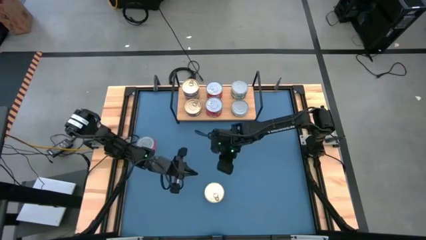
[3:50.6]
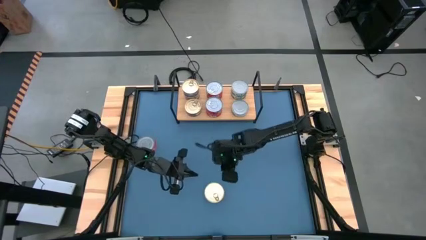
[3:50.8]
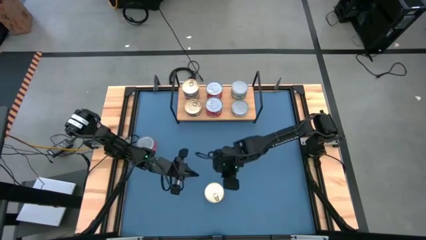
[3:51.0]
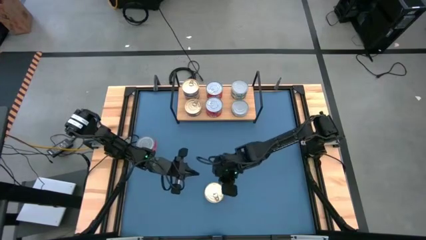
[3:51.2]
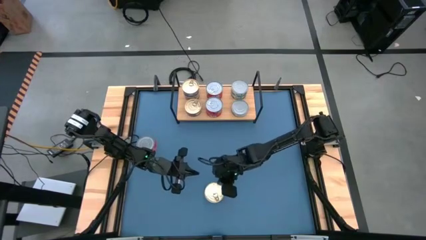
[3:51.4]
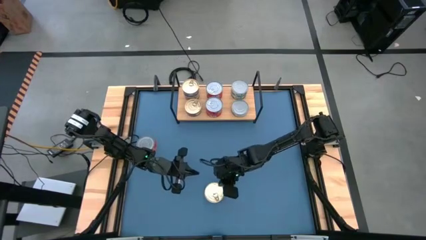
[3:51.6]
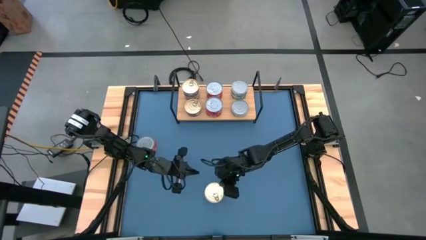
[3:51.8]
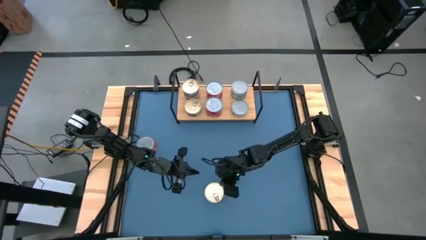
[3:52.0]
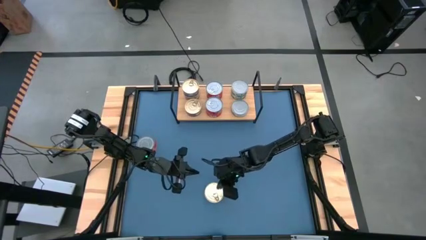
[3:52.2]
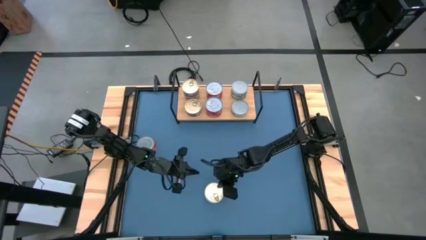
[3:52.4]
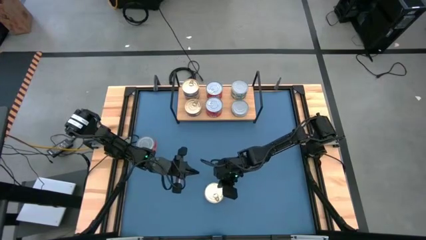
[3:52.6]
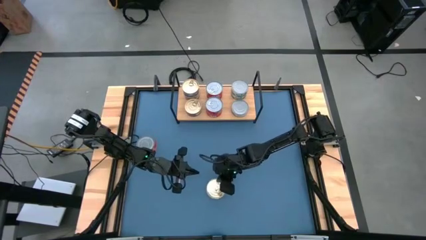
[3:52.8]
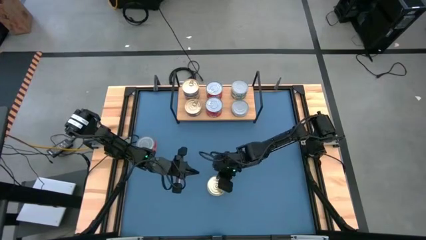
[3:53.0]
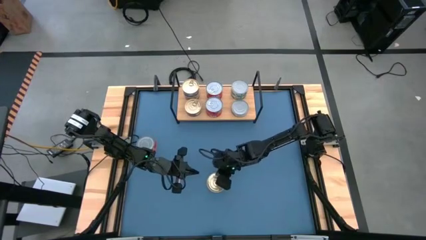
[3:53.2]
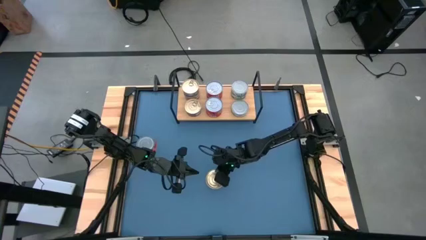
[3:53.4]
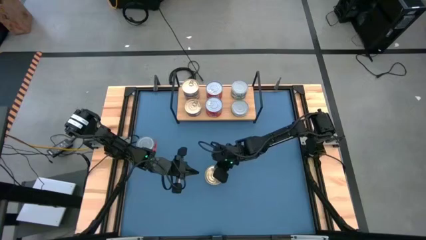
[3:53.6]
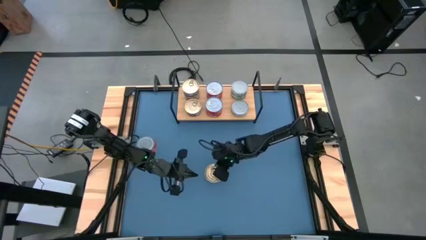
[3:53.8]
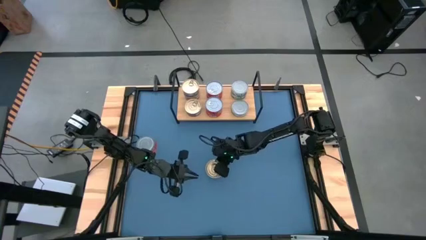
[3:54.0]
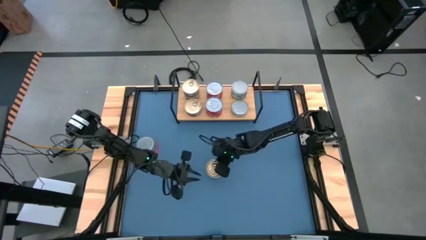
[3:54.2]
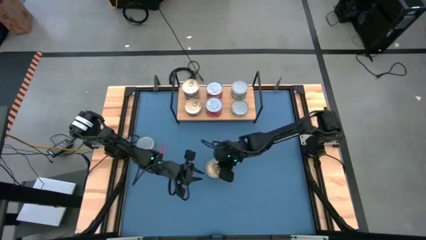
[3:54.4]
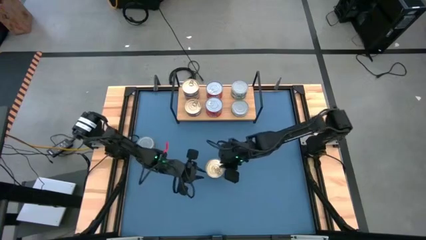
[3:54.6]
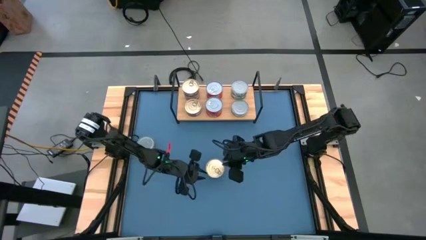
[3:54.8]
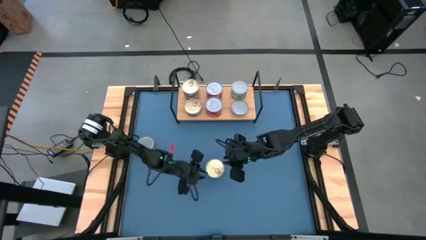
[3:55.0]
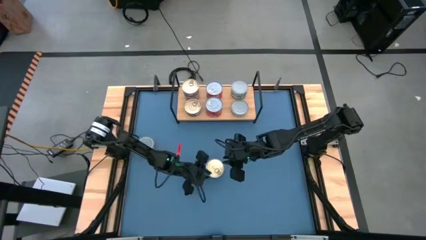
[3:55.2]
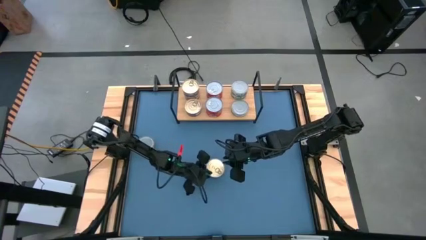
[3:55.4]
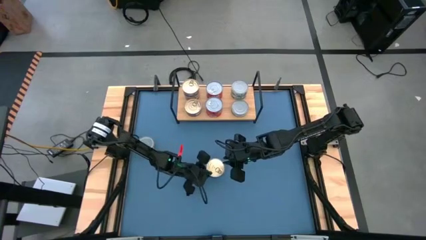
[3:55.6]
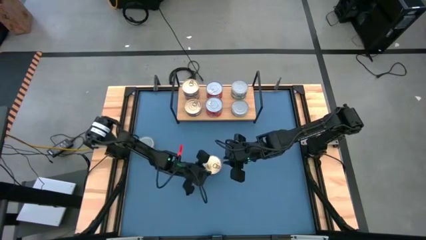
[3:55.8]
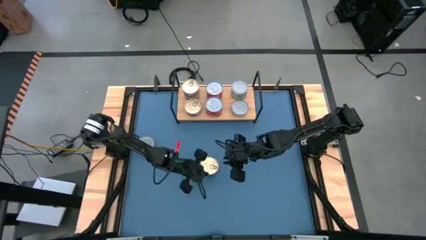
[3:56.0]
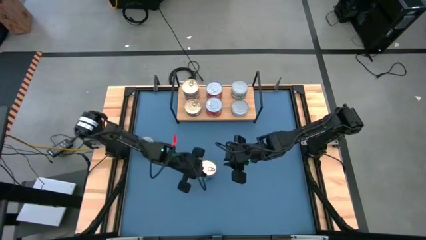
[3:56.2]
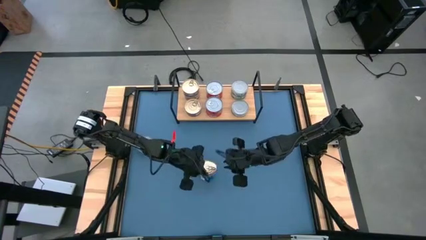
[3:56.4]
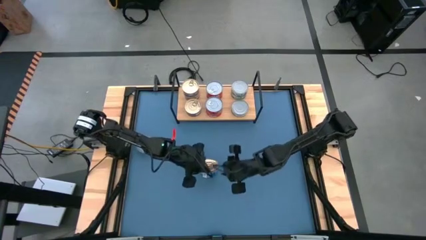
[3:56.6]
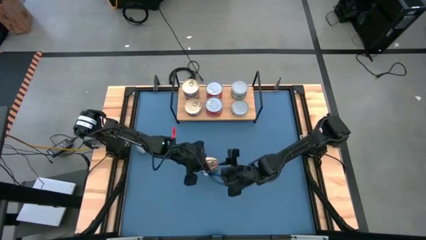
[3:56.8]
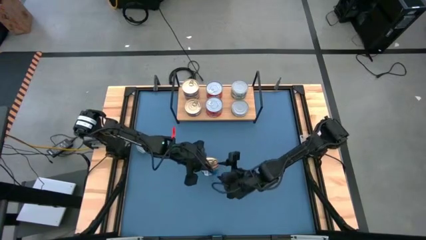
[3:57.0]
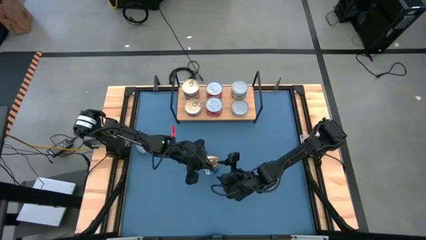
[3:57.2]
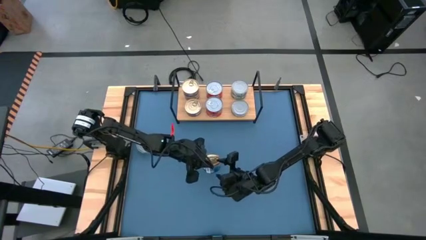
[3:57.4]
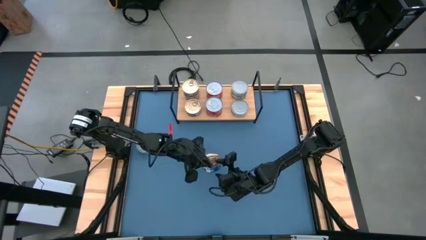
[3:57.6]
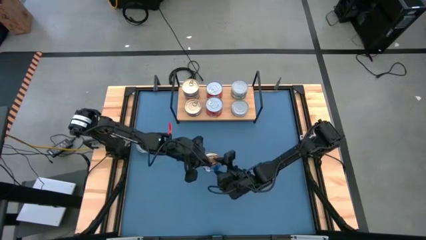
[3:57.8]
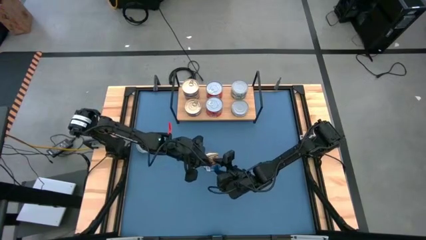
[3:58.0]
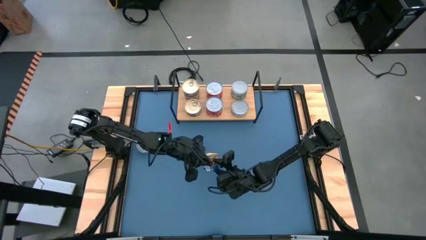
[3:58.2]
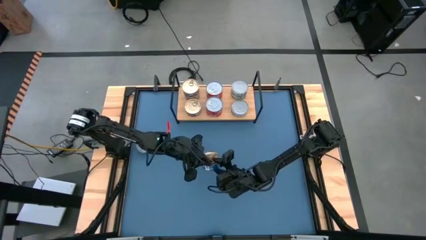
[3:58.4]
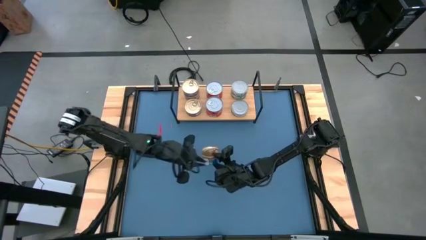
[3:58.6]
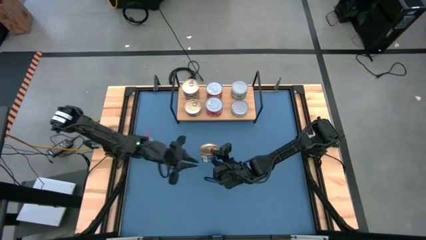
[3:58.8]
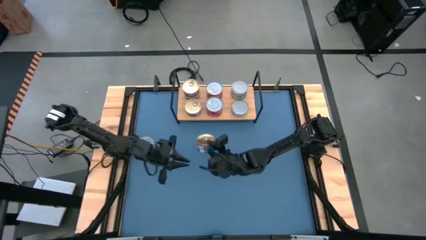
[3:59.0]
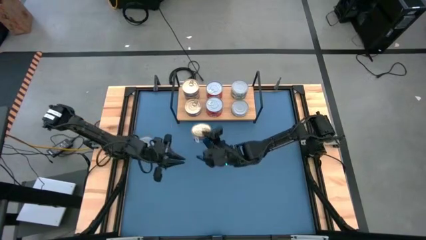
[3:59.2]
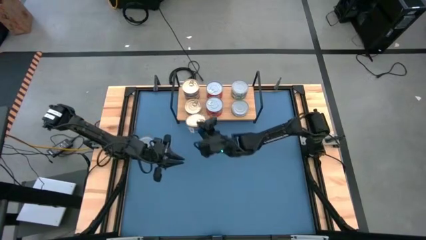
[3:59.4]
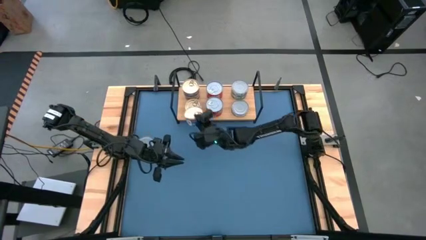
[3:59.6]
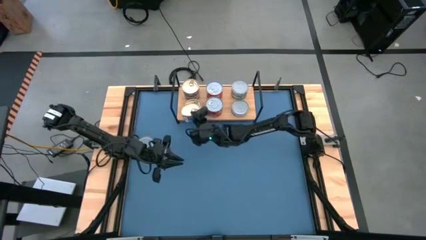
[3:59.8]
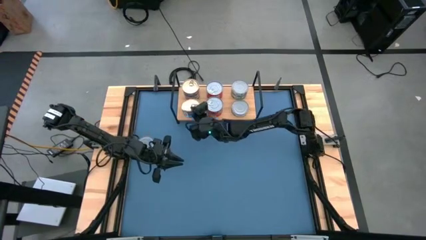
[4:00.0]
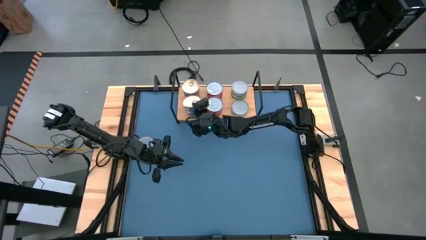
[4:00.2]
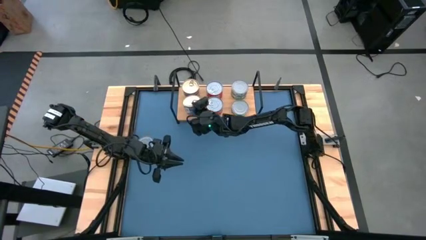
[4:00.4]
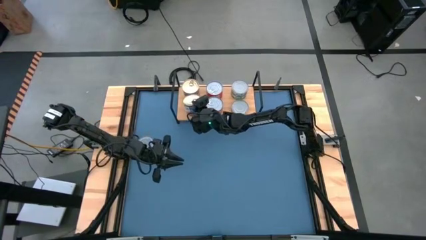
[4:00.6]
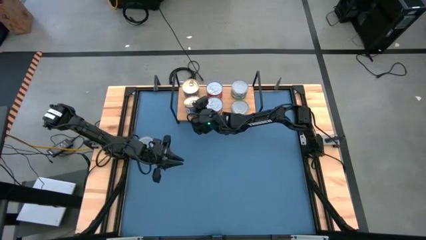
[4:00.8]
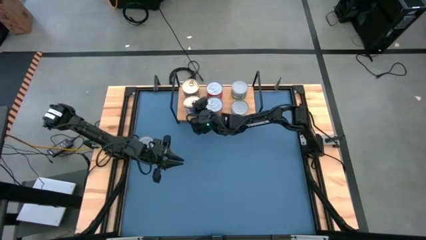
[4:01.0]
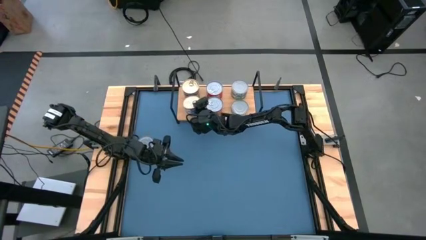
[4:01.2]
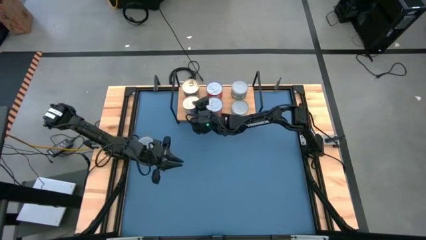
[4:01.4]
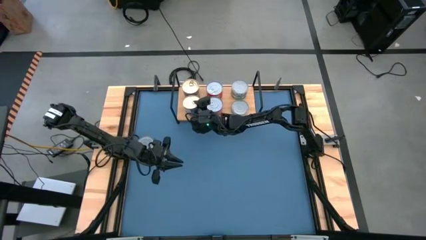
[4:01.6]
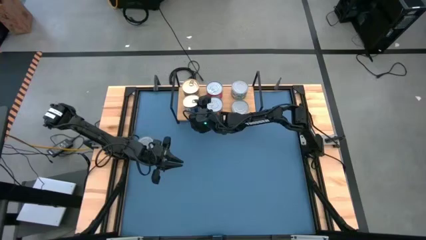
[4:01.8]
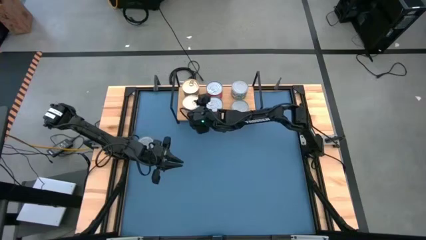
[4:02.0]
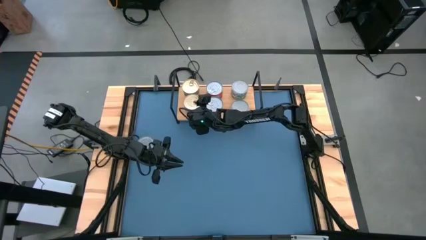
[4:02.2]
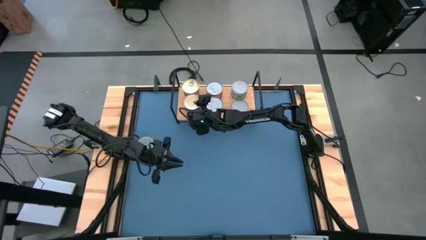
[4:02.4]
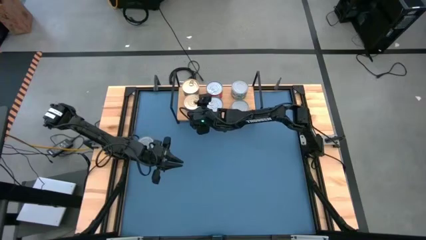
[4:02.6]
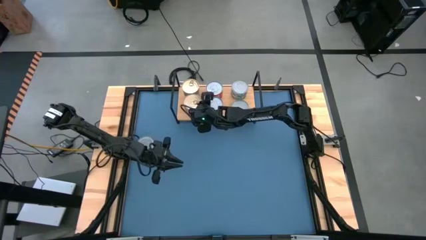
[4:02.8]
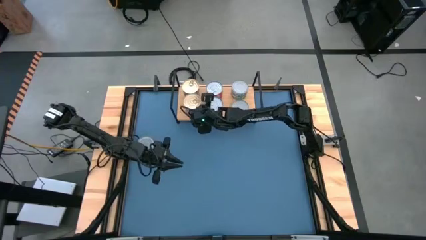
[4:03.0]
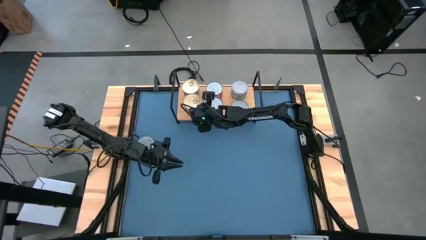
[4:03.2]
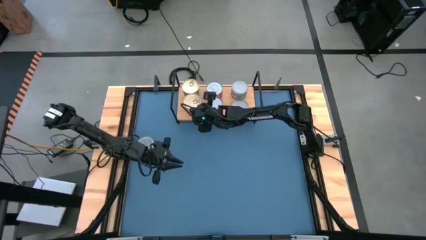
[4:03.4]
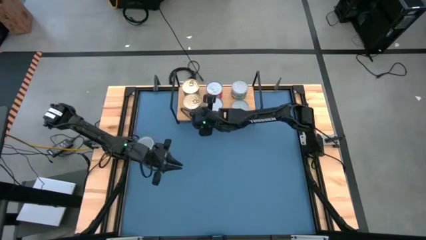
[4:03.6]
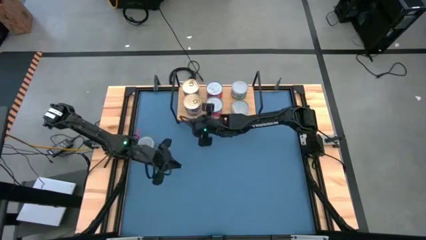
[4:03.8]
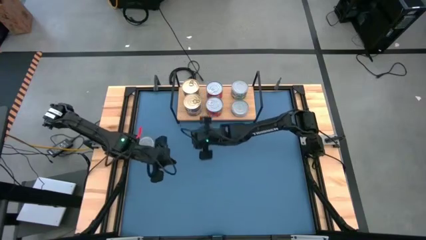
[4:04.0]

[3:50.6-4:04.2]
Task: Stack canned seafood by type on shelf
Stack the blue tuna can on top of the other blue tuna can on the shelf

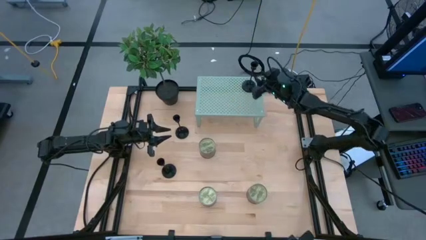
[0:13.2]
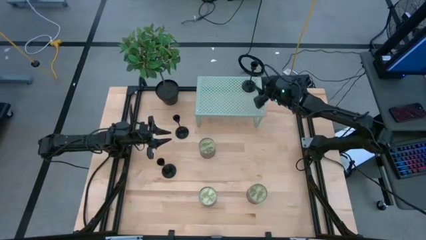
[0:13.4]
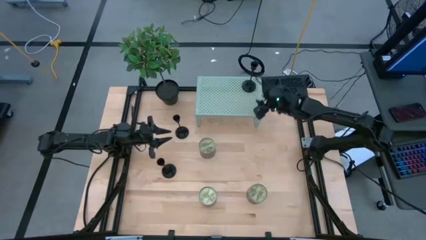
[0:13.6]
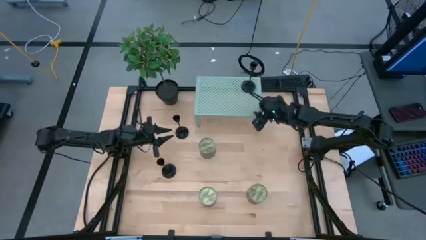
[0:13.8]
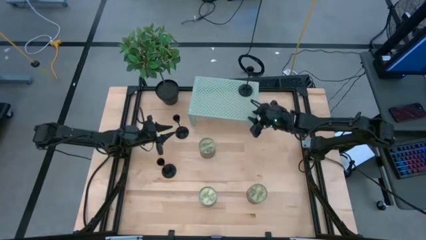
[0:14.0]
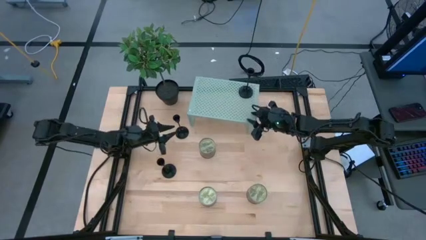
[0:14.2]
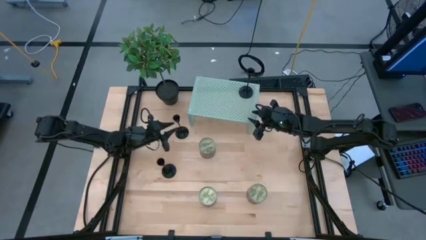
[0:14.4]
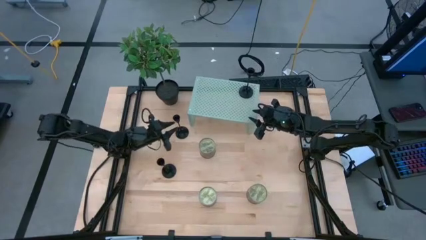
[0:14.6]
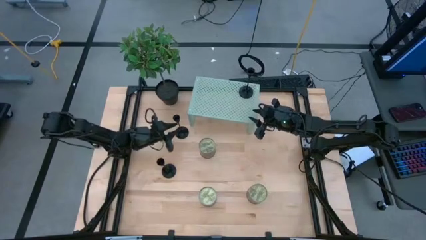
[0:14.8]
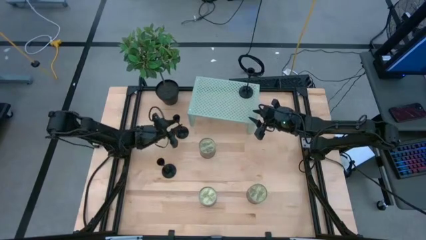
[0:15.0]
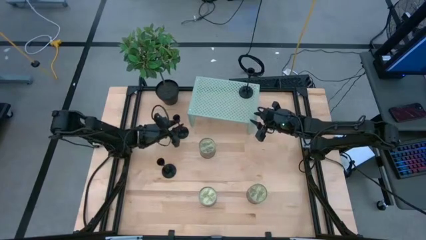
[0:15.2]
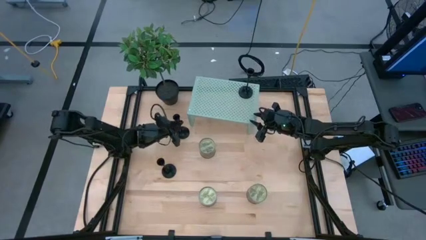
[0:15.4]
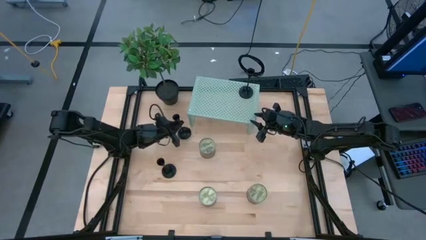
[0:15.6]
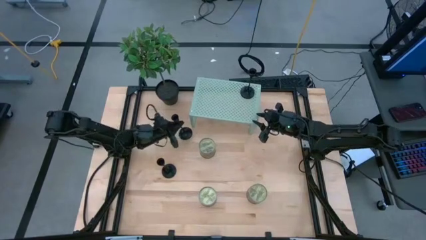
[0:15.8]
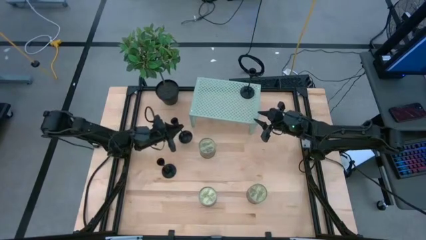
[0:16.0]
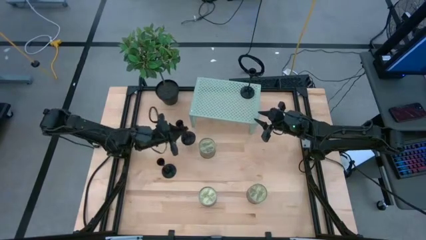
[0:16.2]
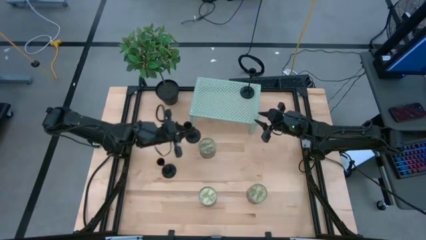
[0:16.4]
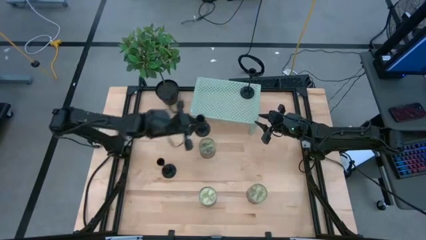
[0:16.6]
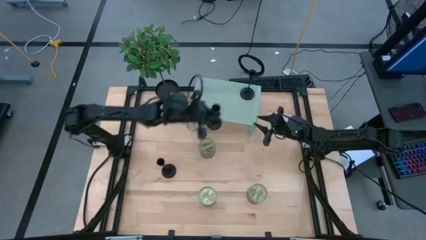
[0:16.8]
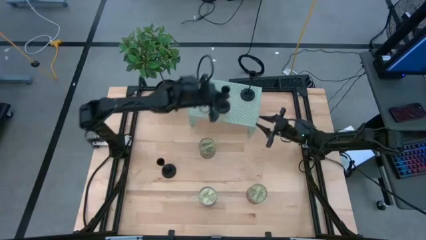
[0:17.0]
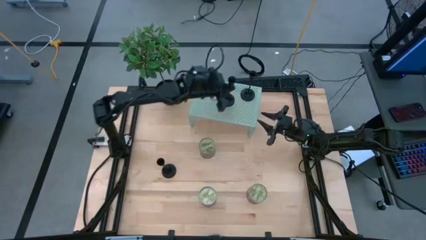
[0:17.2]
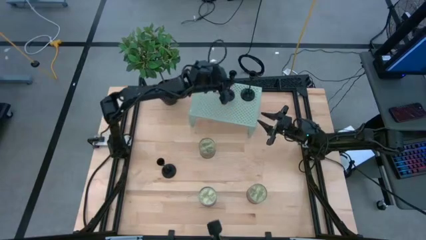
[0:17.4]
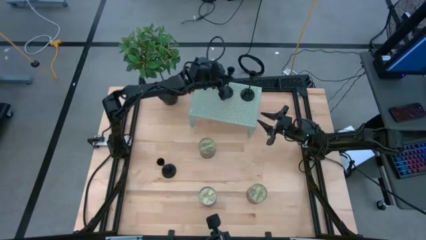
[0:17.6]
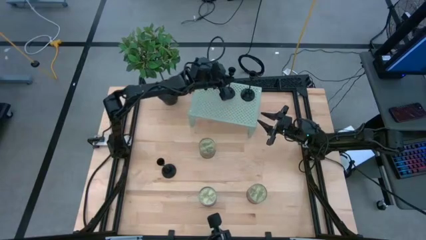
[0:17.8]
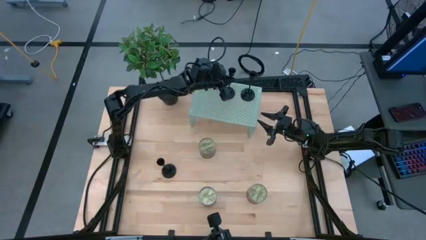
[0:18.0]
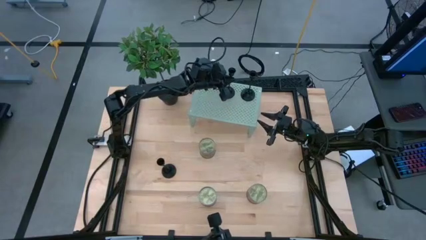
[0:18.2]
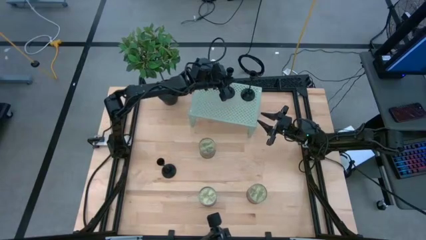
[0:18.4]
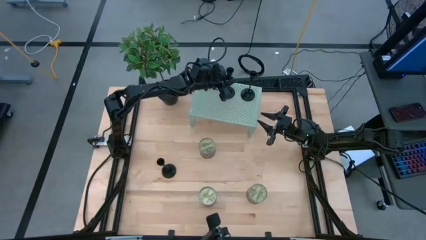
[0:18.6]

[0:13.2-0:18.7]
Task: Pick & Place candle stick holders
Put the top black candle holder on the shelf
